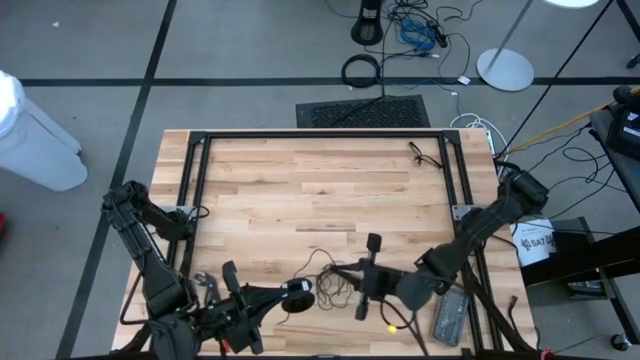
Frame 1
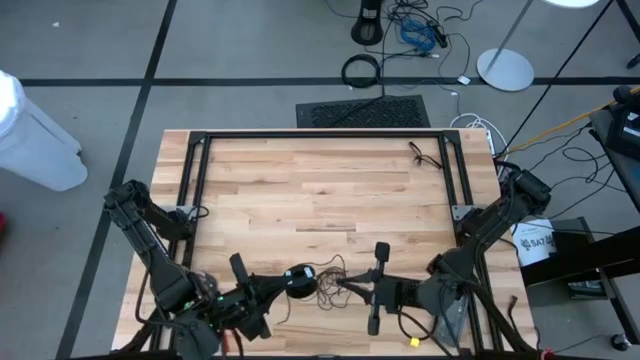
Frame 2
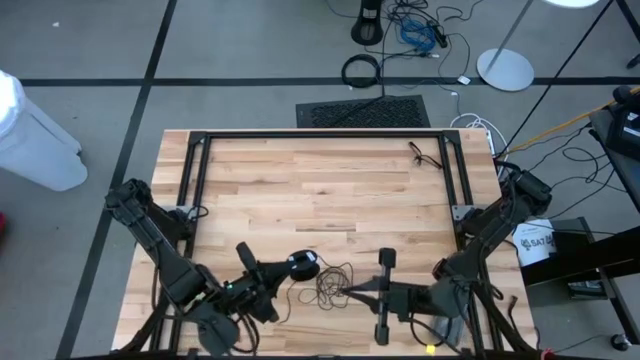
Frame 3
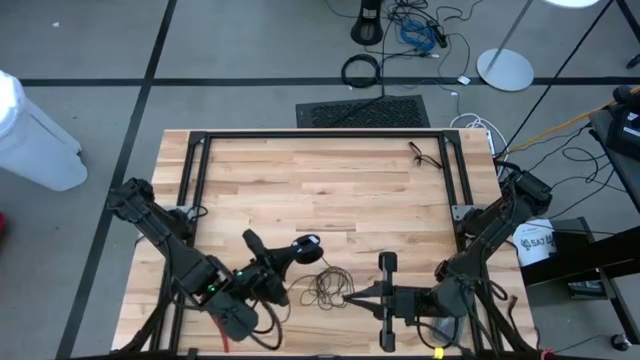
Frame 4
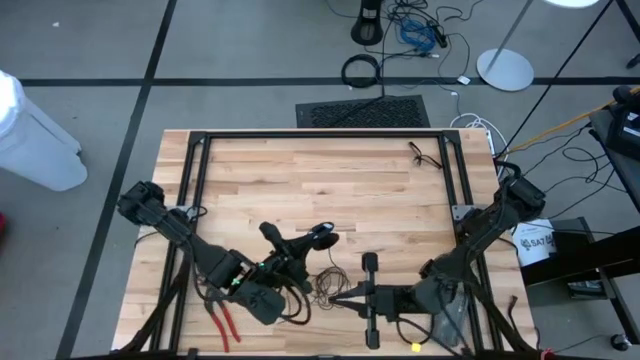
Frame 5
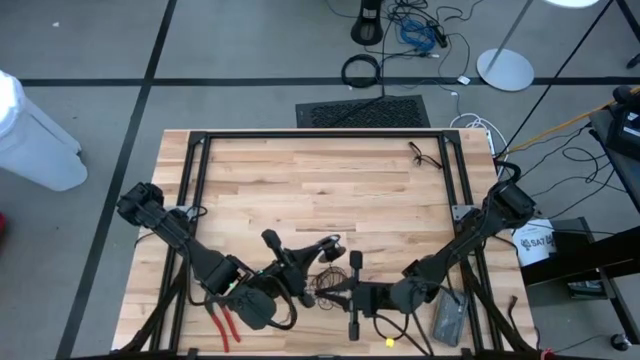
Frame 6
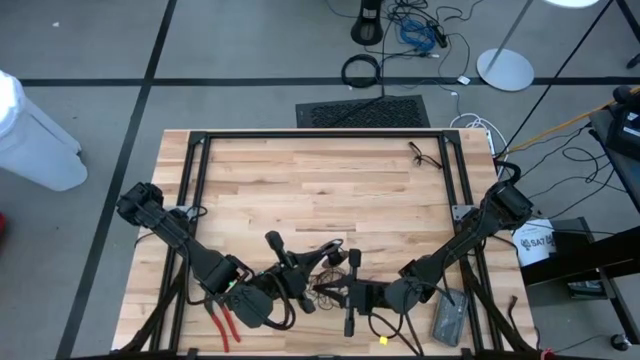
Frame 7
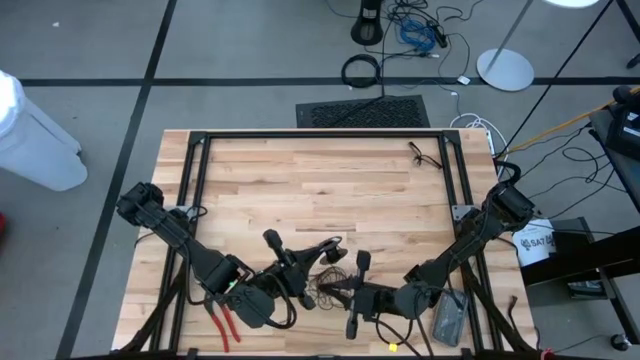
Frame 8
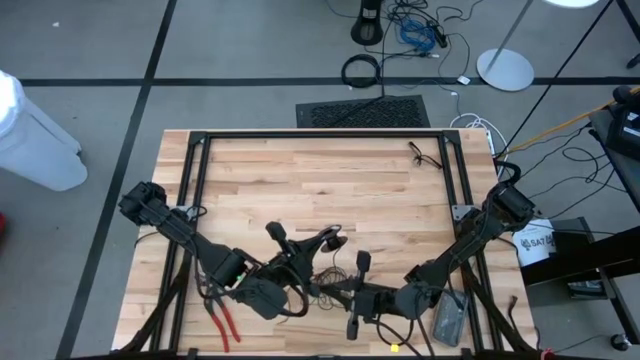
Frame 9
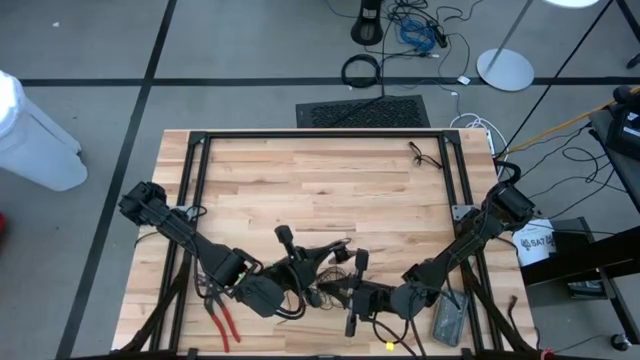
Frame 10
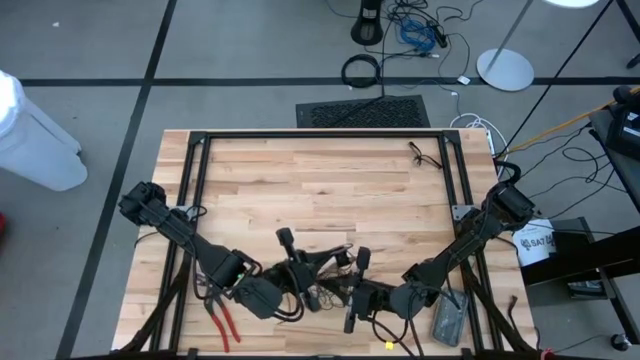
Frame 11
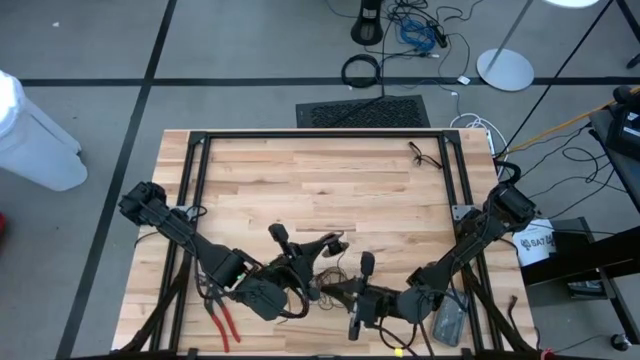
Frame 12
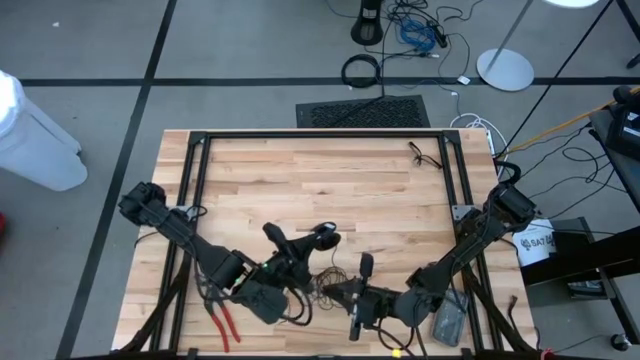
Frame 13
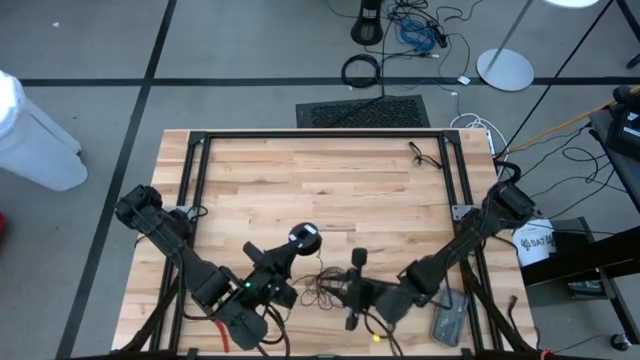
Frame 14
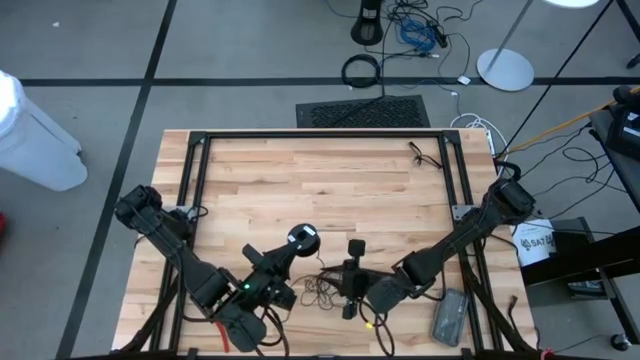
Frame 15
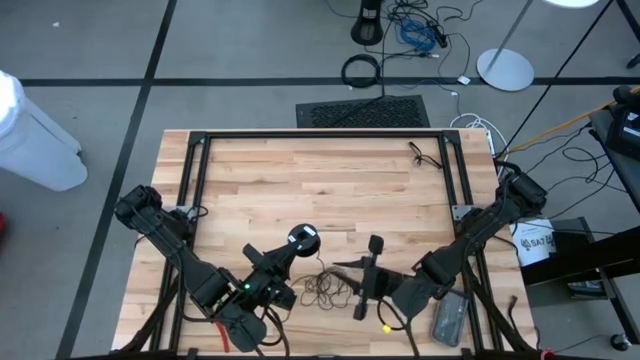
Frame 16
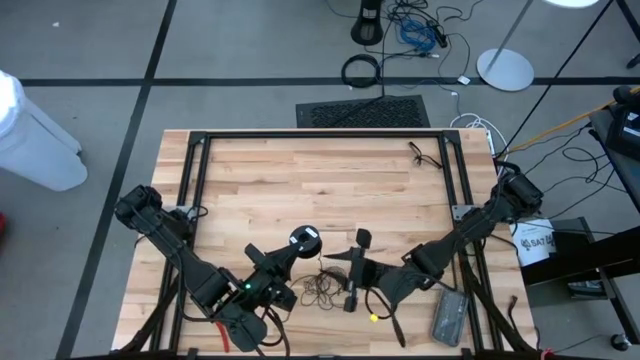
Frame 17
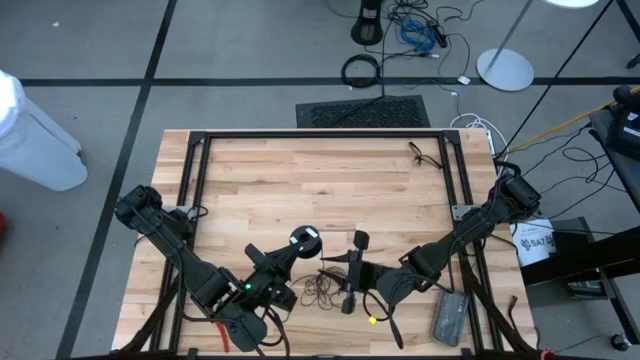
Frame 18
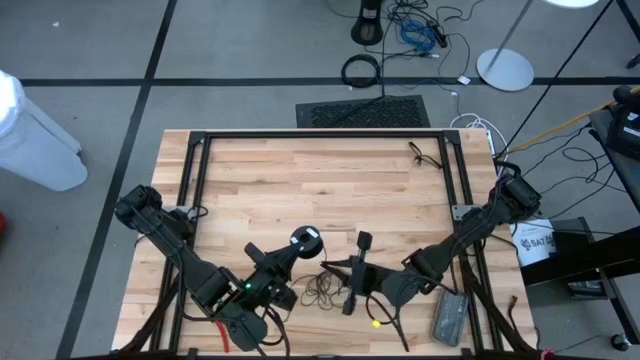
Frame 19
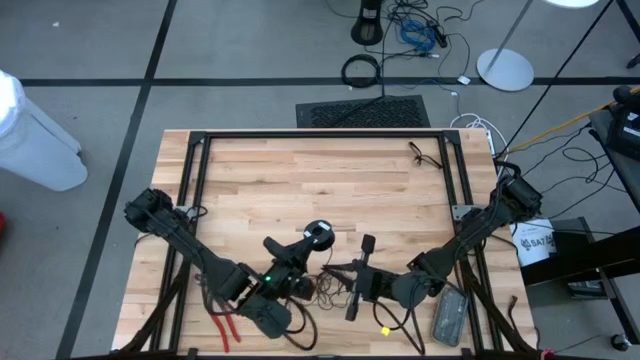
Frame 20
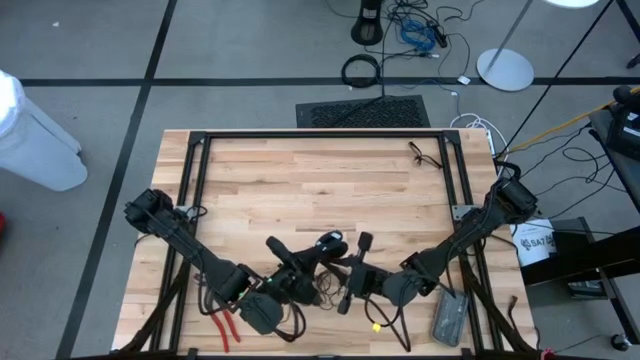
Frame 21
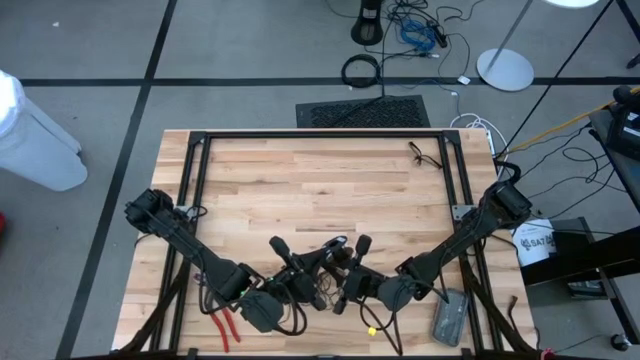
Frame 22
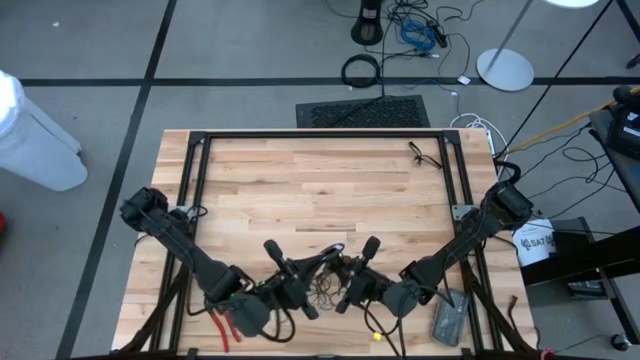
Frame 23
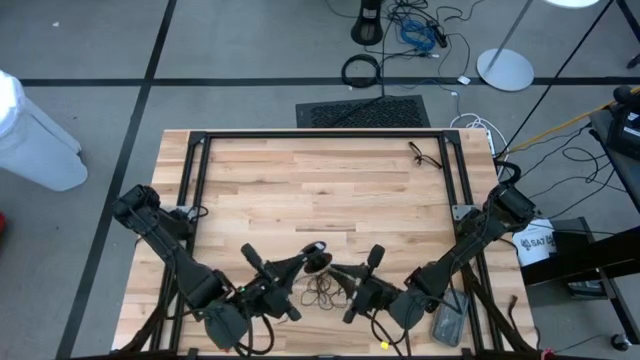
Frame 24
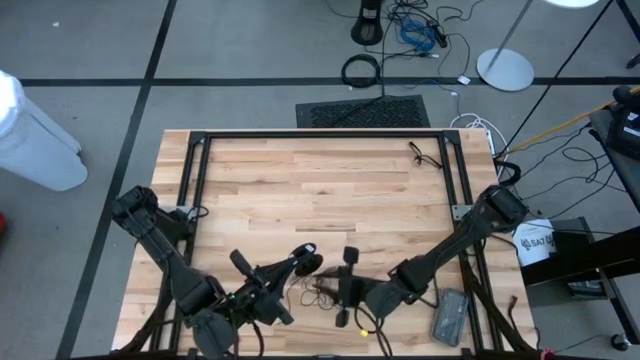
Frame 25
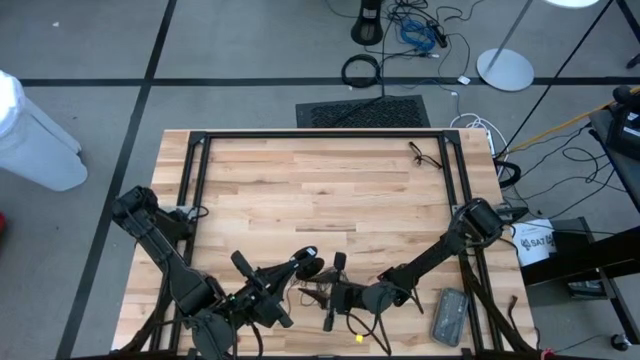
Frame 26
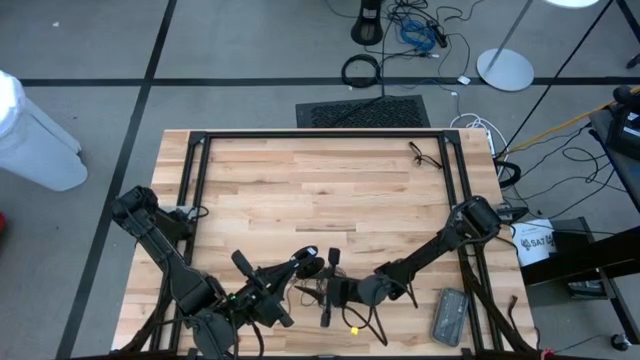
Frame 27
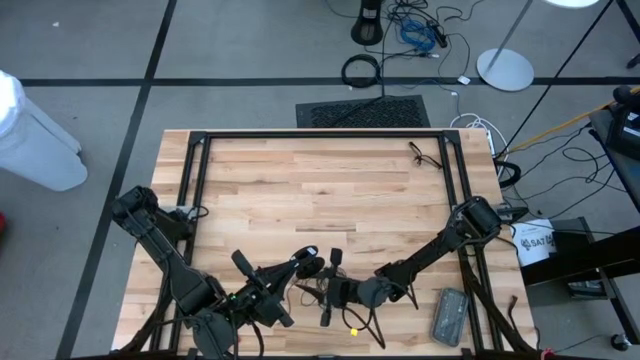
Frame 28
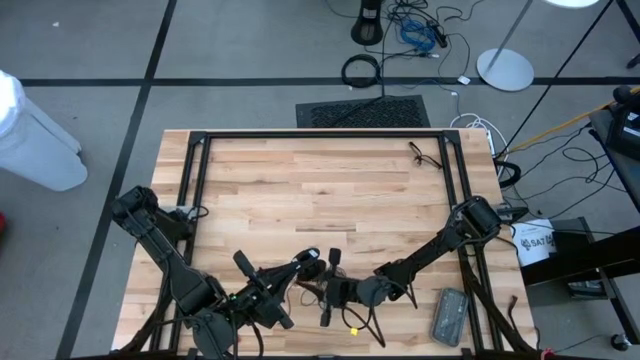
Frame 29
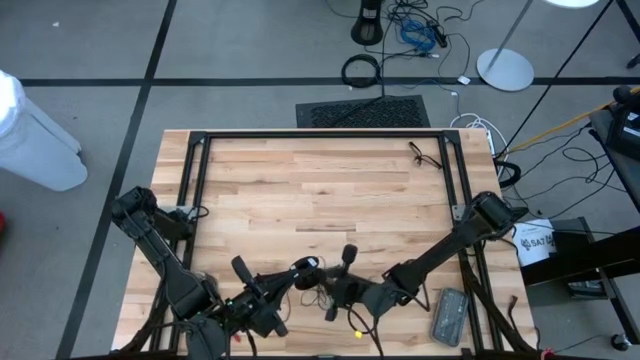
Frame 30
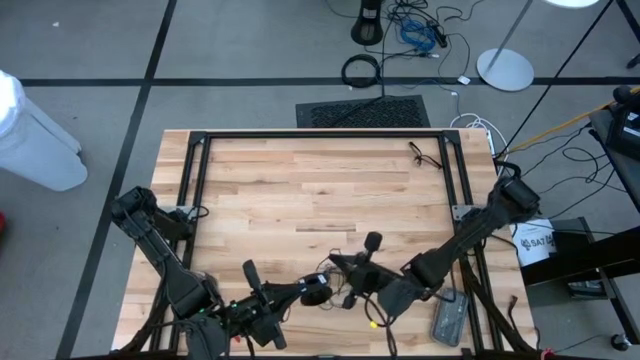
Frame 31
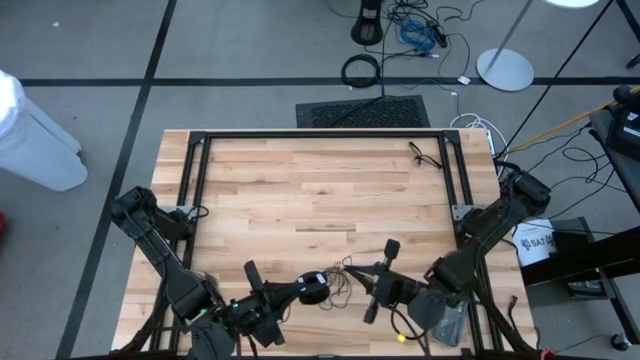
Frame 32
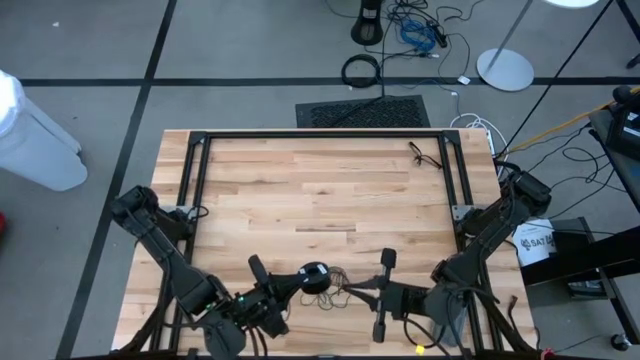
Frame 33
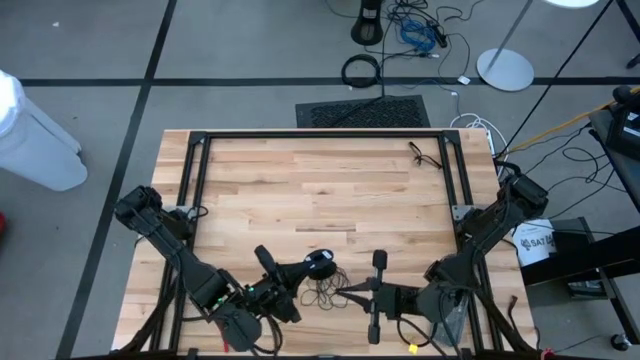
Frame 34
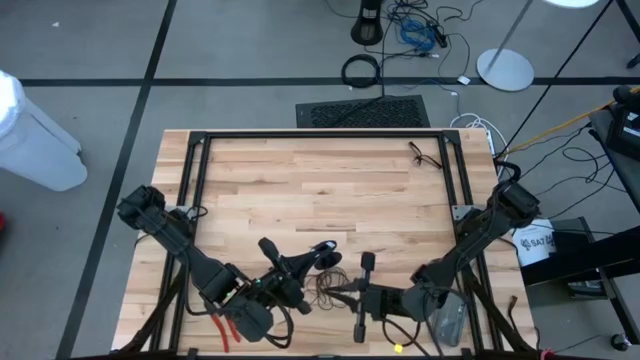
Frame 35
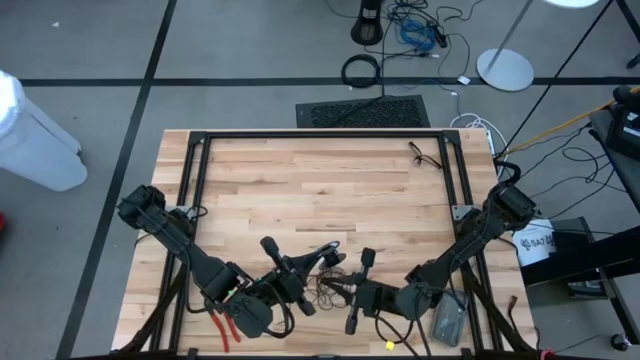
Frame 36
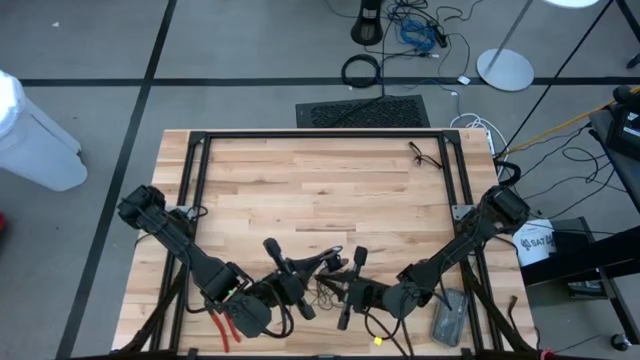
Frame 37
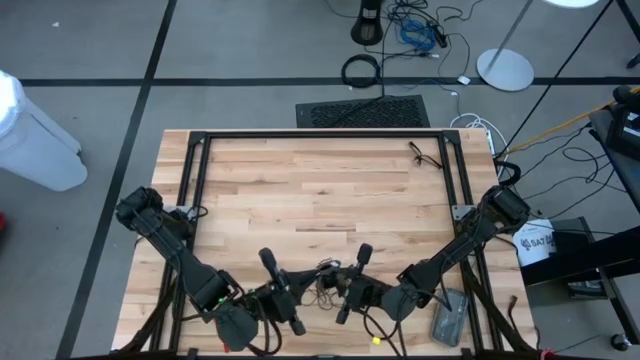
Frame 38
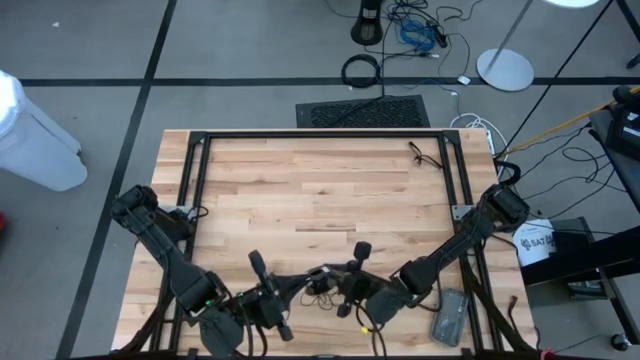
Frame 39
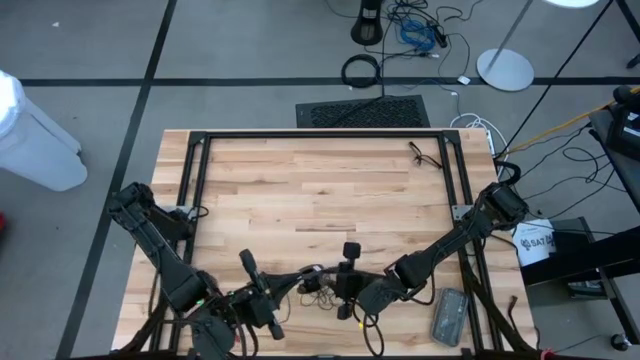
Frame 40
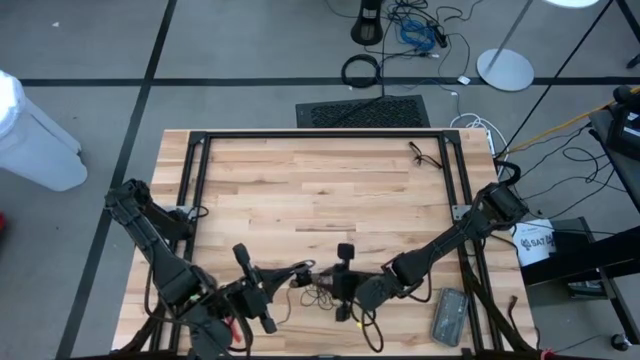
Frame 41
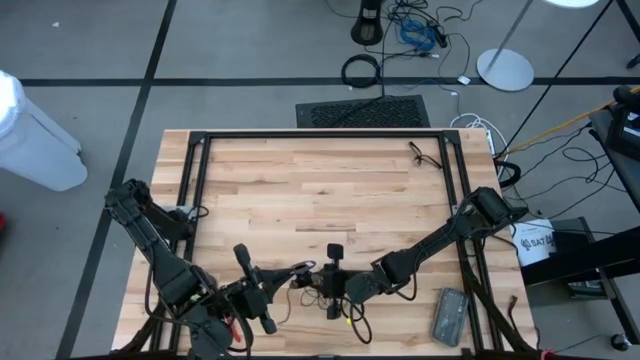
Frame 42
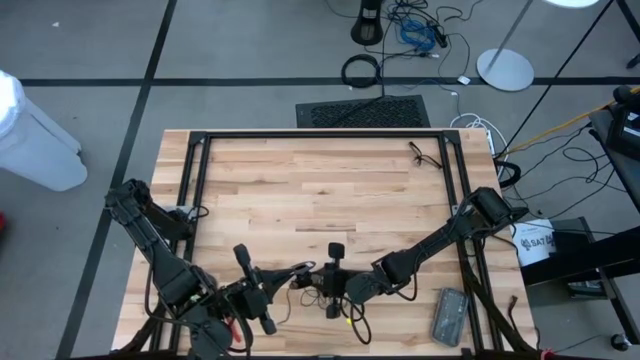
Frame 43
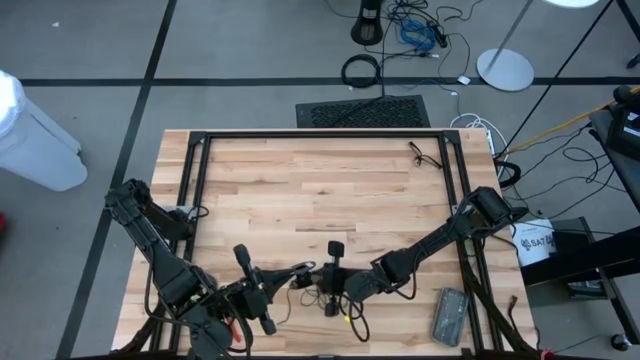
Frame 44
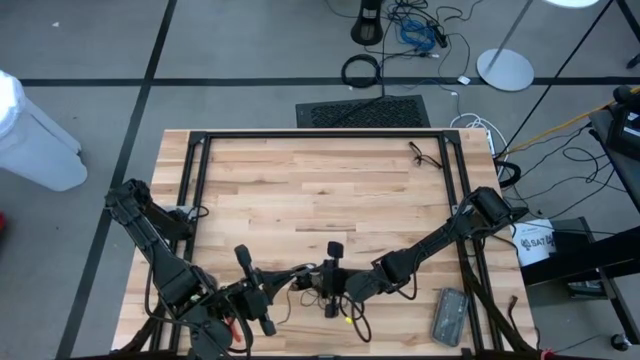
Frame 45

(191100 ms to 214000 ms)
Task: Coil cords
Coil the black wire onto the black spool
